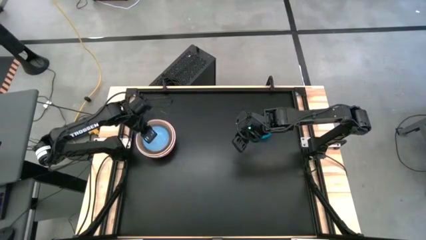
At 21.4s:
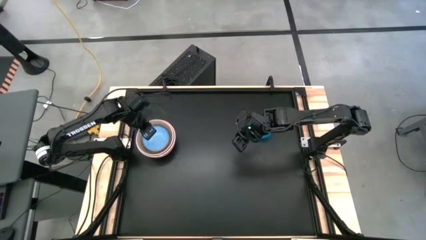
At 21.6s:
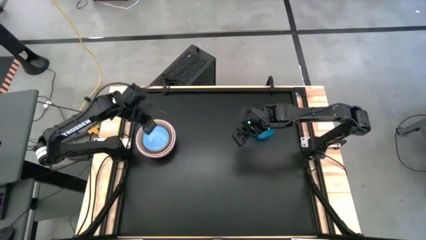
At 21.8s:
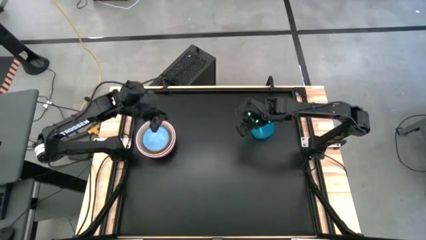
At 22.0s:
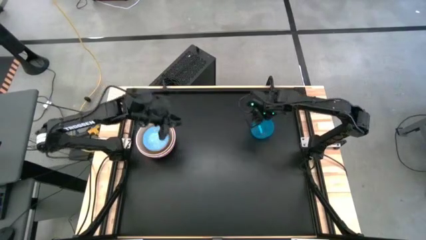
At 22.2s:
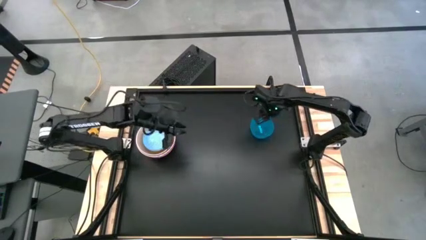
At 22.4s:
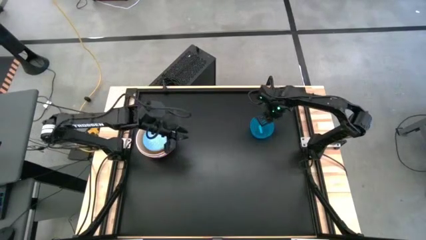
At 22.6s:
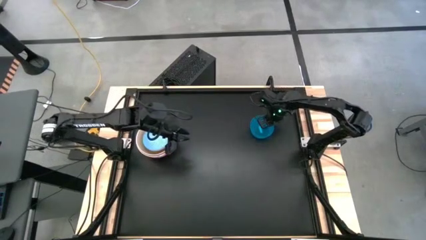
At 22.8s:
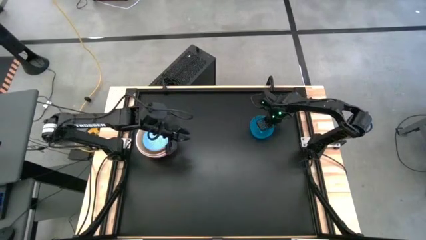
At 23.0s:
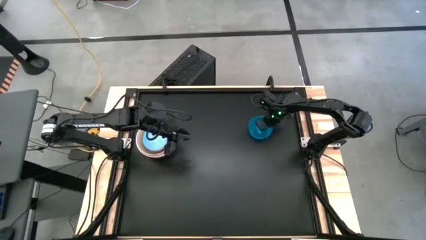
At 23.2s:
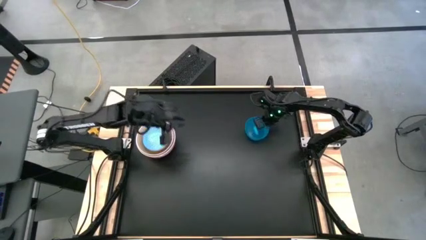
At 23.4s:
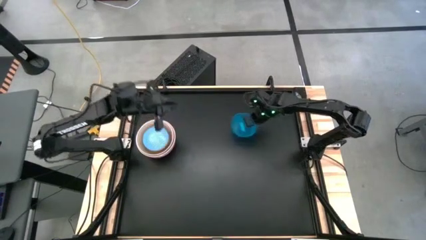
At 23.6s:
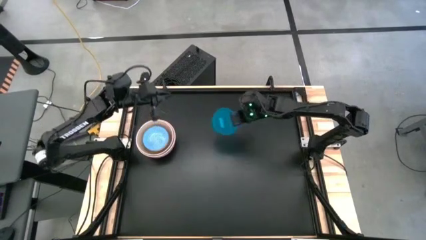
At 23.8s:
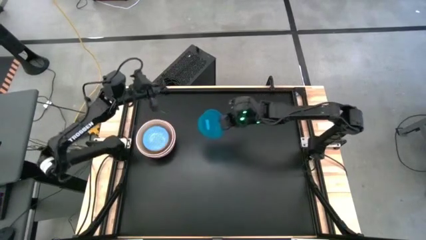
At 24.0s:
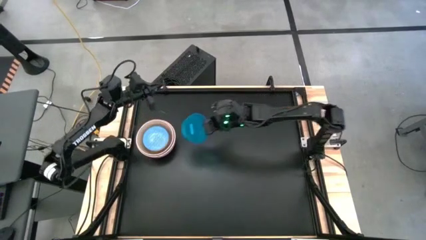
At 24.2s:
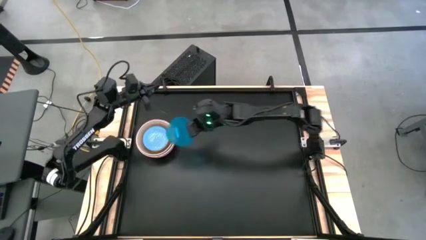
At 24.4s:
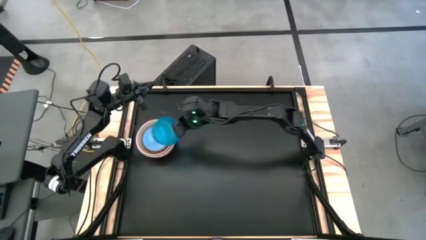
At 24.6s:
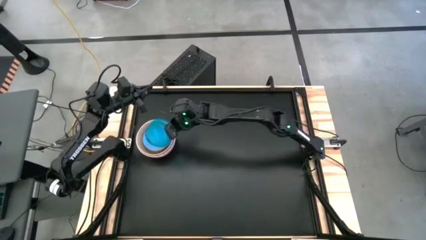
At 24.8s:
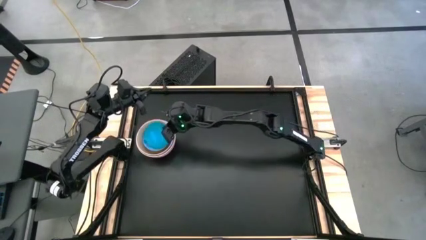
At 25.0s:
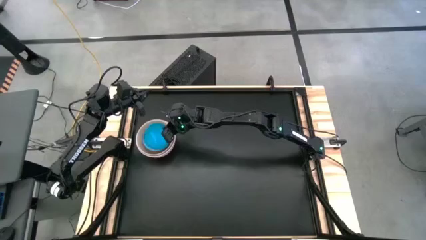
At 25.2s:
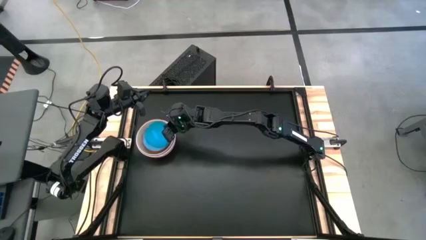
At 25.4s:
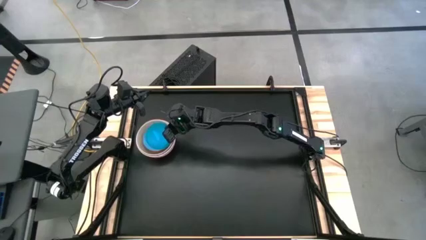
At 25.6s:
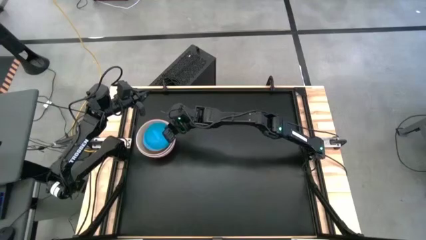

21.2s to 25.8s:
Stack the blue bowl on top of the blue patterned bowl

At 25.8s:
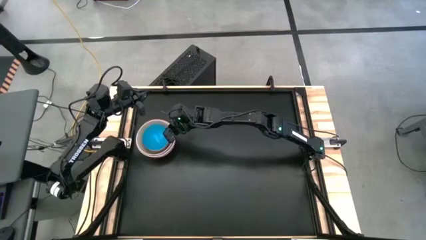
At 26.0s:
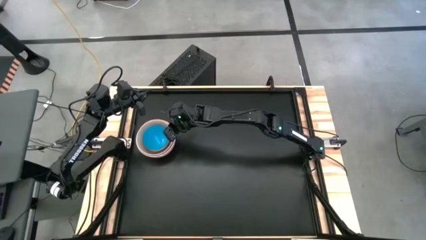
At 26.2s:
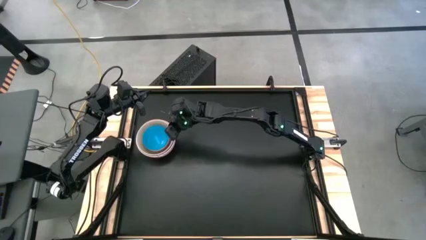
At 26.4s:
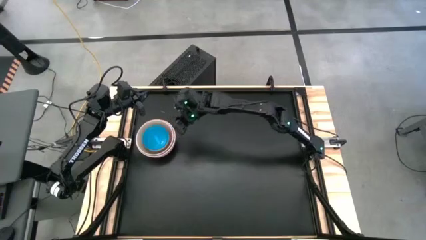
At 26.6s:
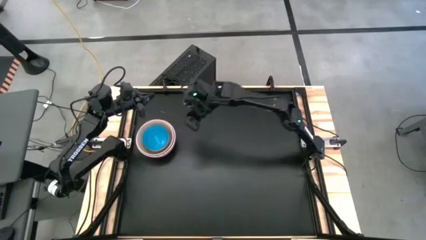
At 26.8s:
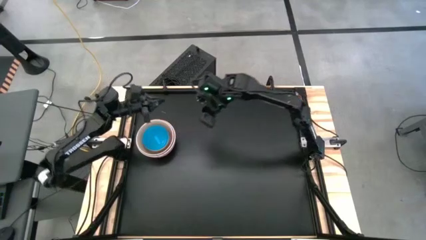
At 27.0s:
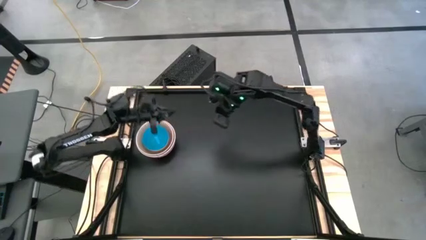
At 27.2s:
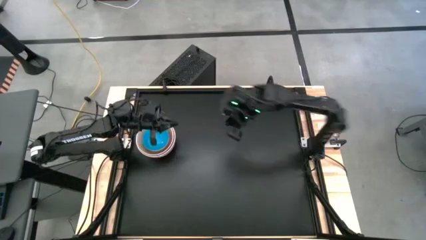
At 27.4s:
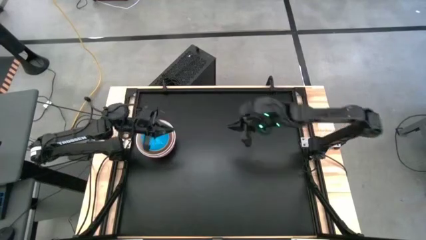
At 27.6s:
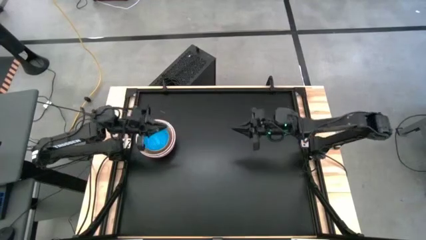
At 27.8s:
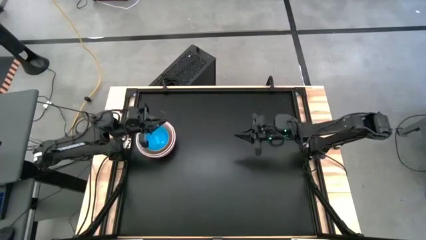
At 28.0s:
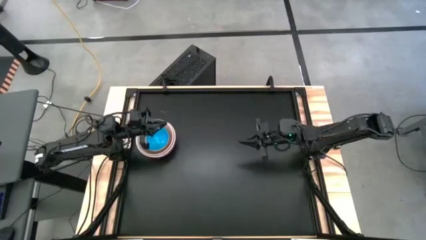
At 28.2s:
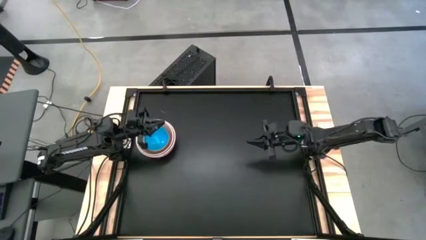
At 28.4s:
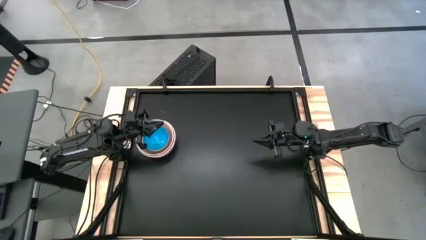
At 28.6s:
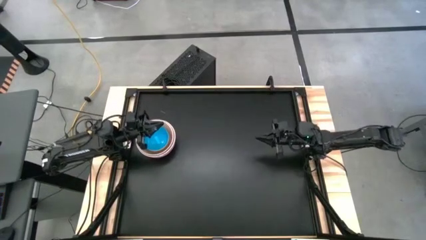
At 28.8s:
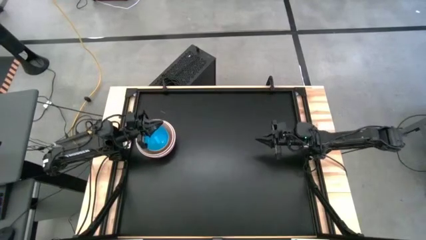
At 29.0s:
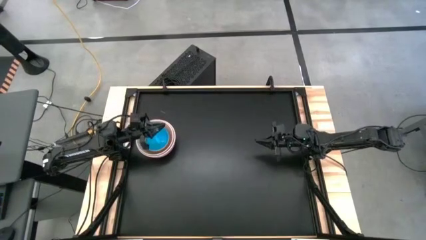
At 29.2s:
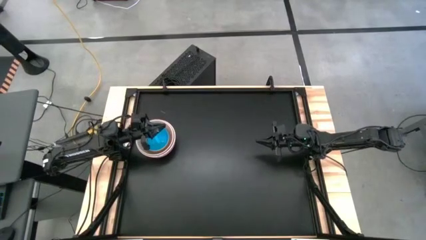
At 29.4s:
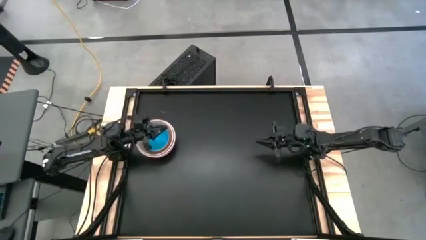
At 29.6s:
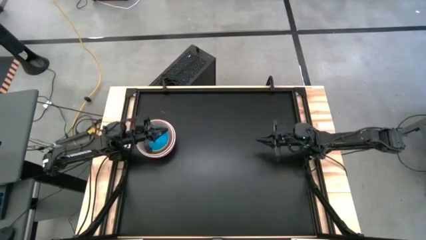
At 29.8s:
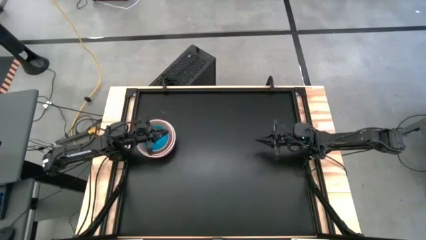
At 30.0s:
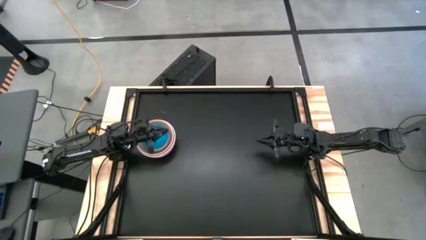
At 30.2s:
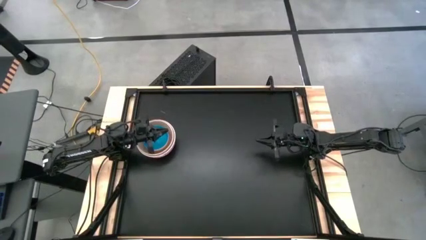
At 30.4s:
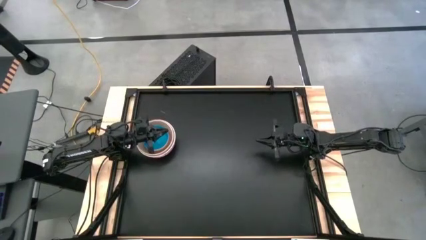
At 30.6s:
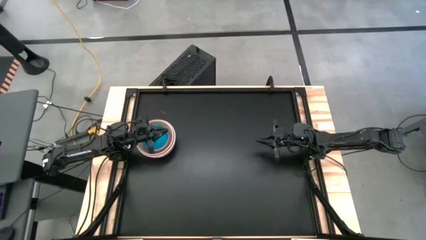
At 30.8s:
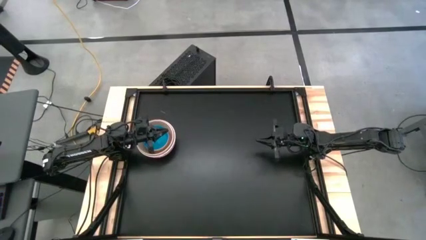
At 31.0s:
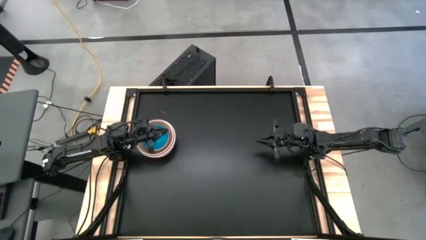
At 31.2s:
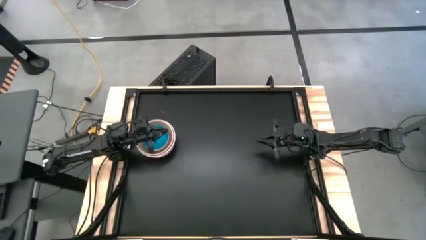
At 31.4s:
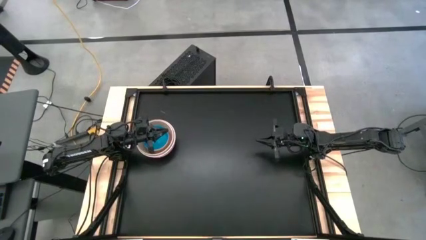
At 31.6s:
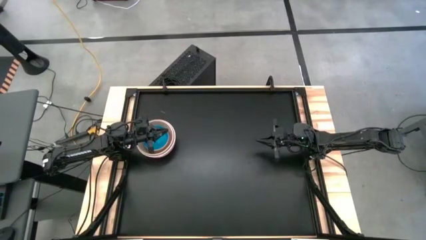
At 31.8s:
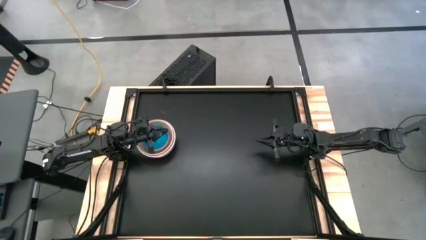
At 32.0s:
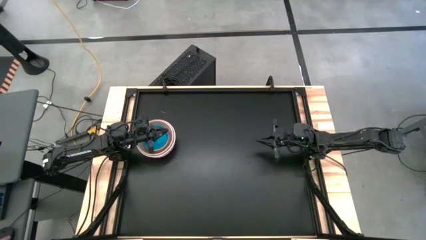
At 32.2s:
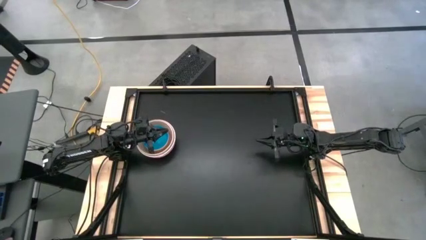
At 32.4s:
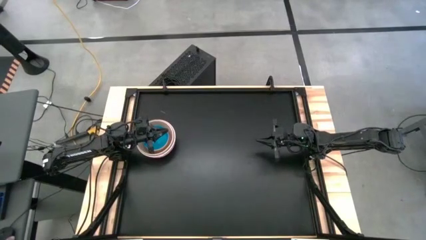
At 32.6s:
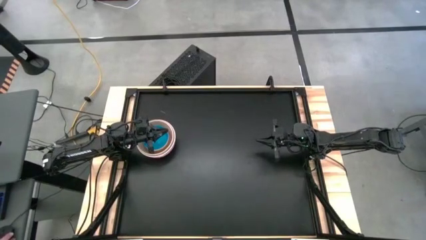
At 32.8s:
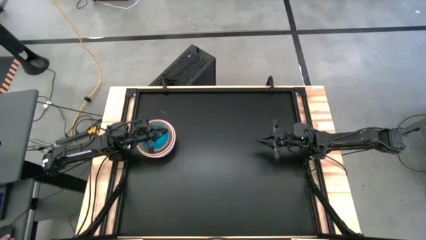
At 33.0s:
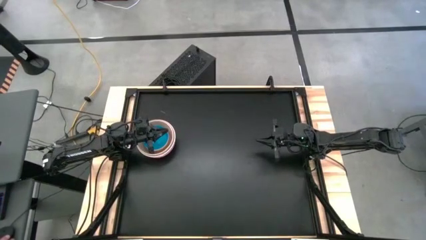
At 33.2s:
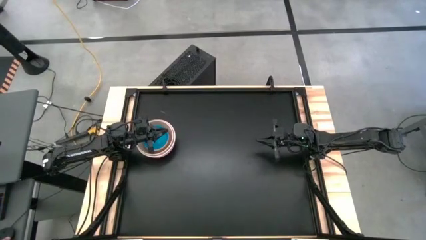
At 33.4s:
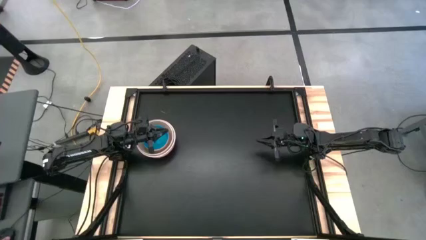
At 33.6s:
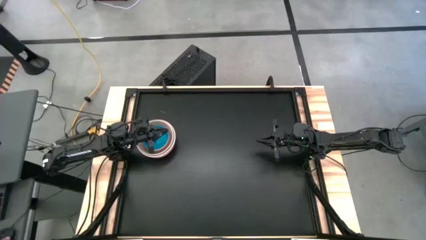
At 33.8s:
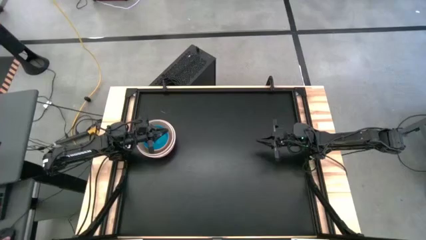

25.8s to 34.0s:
Return to Home Position
